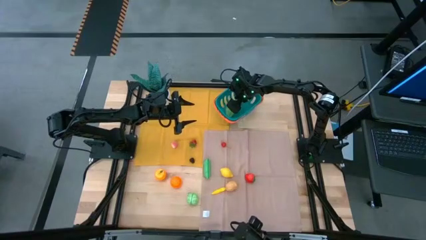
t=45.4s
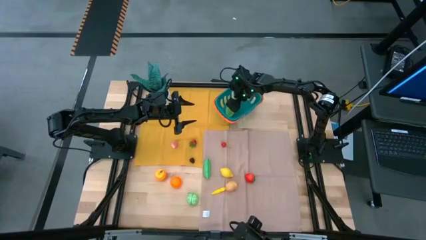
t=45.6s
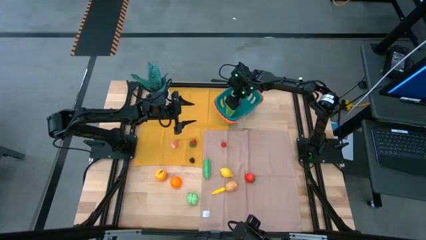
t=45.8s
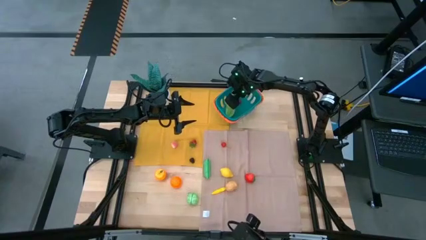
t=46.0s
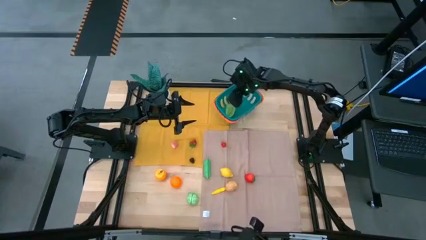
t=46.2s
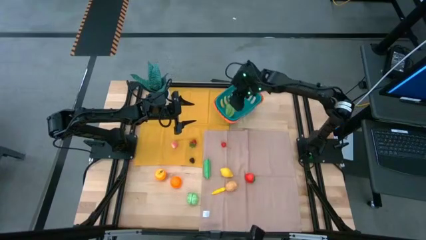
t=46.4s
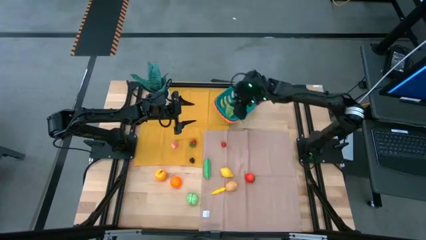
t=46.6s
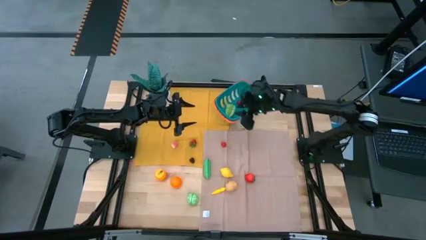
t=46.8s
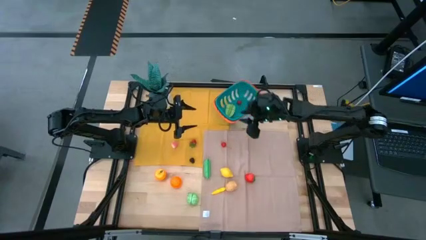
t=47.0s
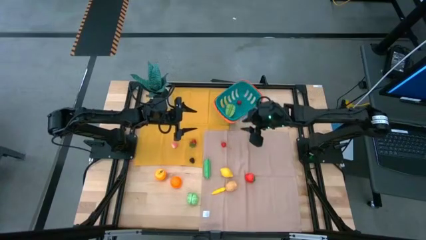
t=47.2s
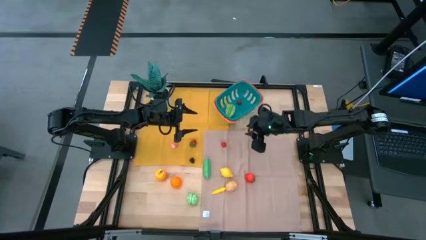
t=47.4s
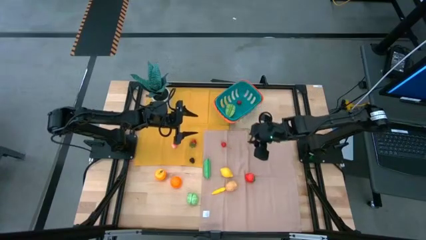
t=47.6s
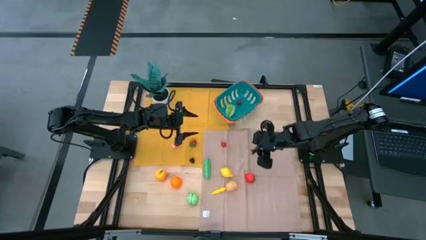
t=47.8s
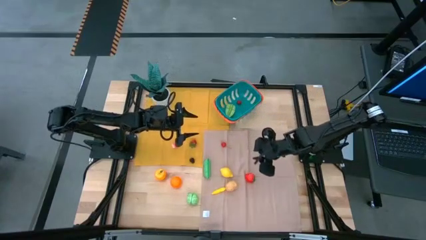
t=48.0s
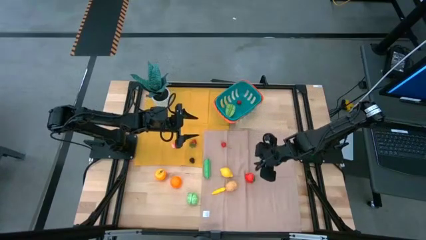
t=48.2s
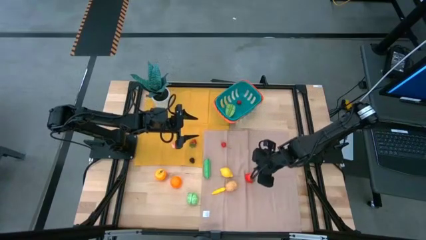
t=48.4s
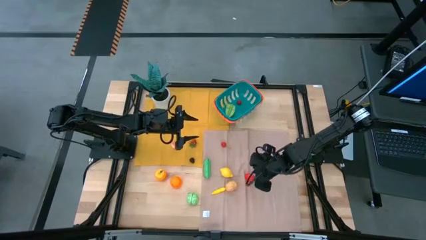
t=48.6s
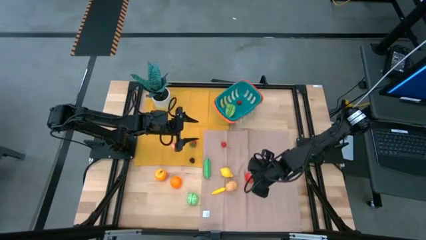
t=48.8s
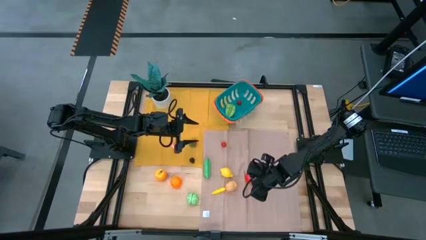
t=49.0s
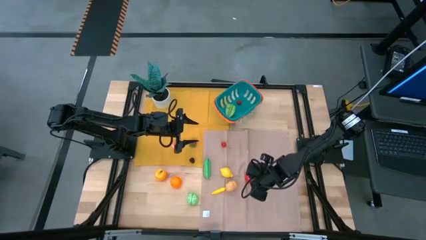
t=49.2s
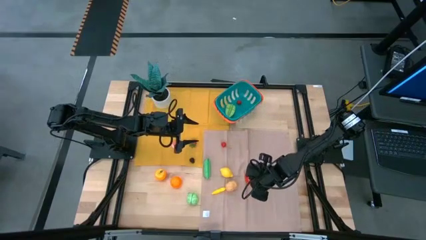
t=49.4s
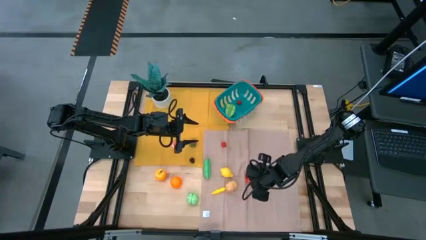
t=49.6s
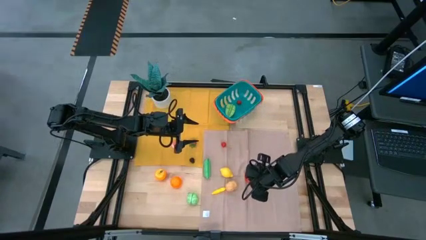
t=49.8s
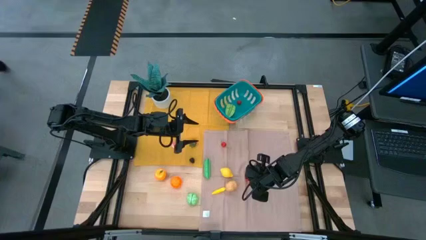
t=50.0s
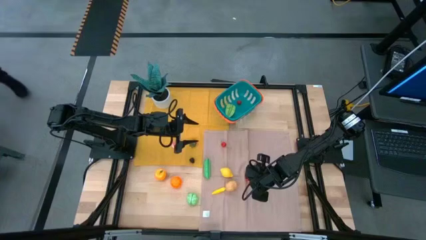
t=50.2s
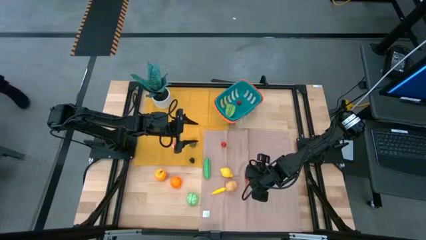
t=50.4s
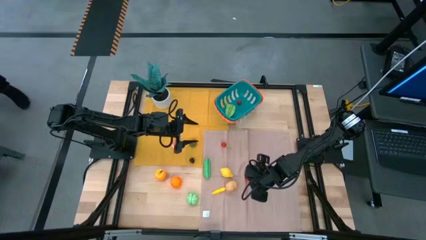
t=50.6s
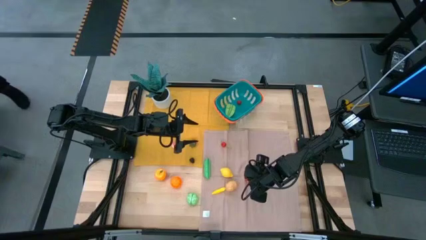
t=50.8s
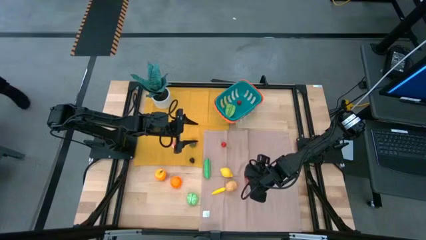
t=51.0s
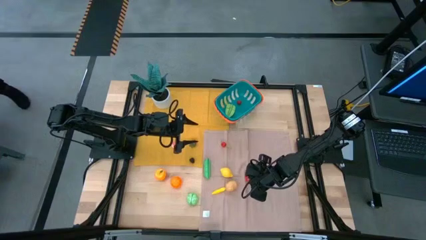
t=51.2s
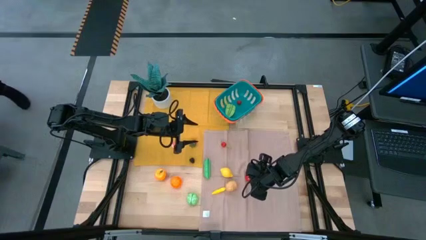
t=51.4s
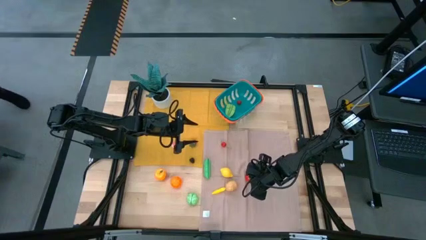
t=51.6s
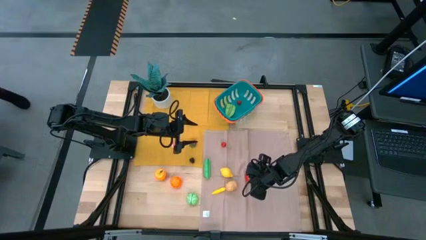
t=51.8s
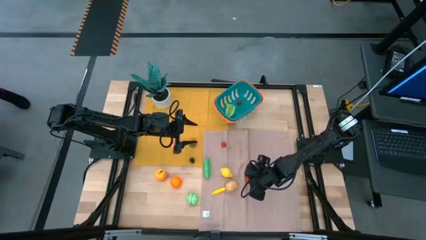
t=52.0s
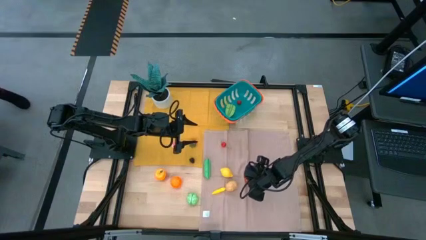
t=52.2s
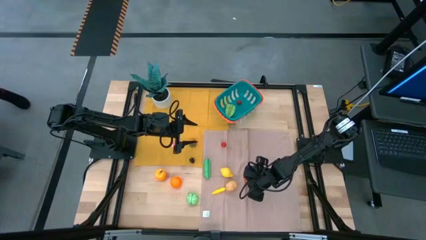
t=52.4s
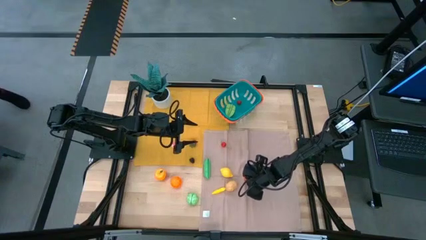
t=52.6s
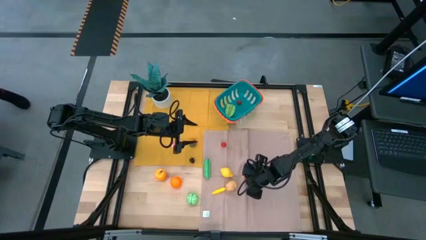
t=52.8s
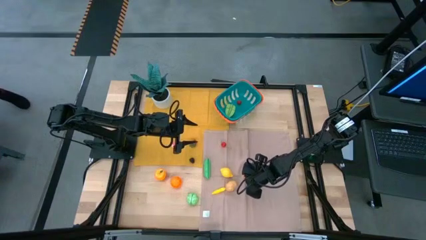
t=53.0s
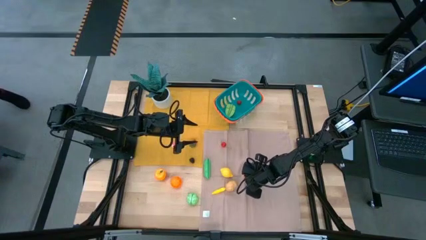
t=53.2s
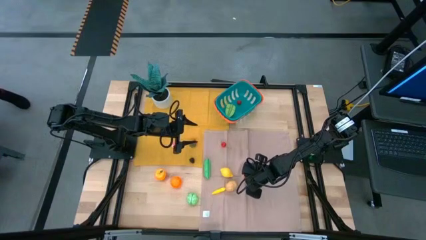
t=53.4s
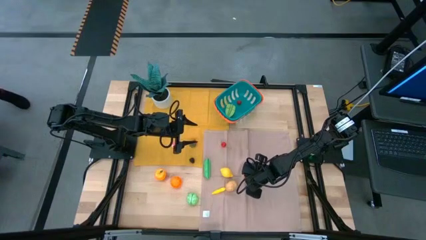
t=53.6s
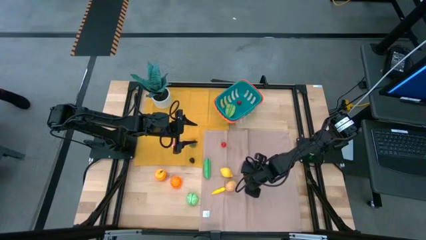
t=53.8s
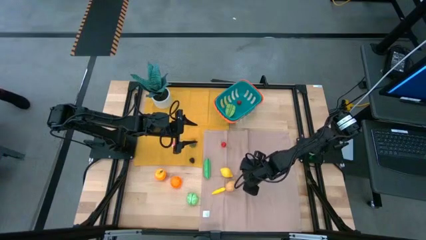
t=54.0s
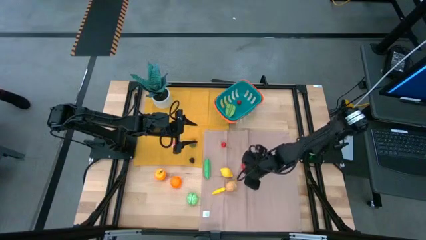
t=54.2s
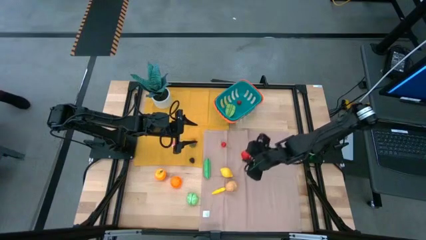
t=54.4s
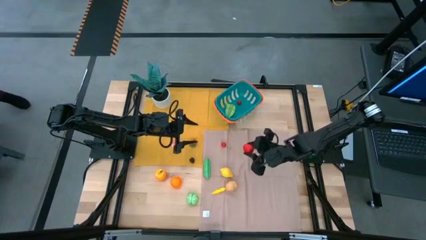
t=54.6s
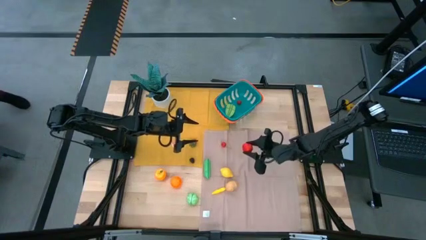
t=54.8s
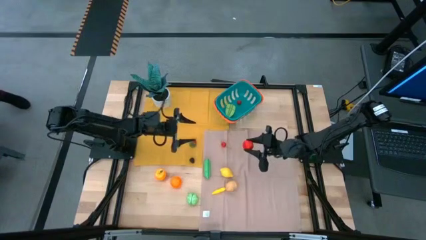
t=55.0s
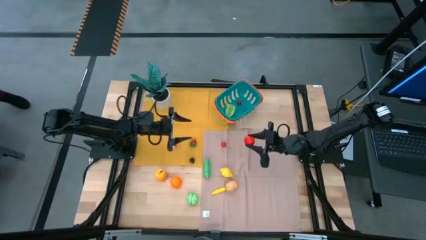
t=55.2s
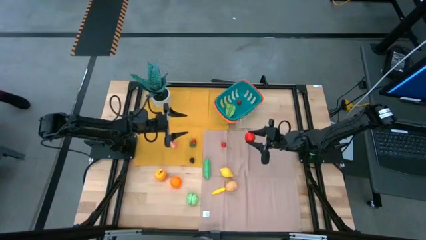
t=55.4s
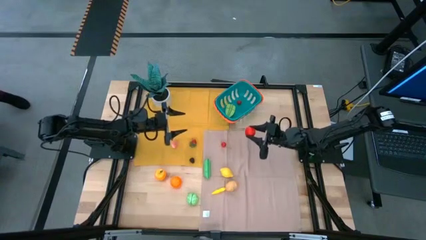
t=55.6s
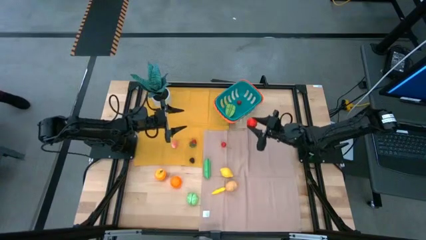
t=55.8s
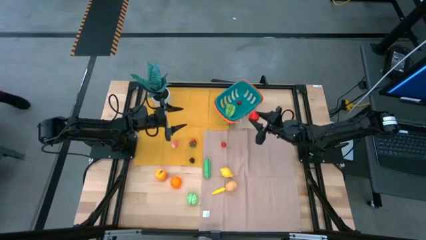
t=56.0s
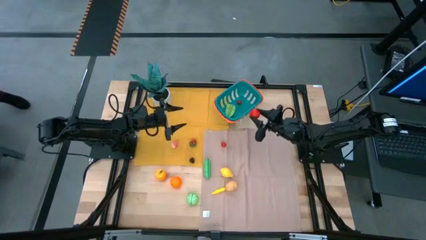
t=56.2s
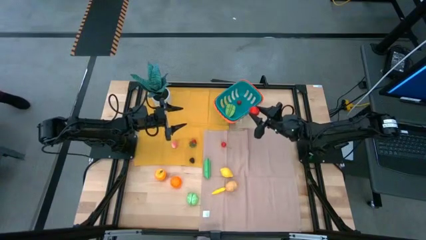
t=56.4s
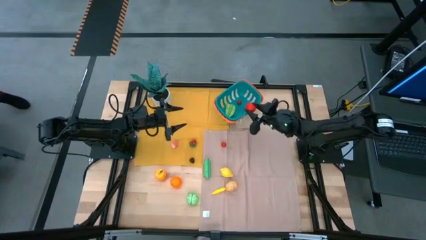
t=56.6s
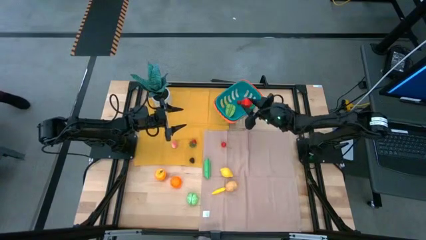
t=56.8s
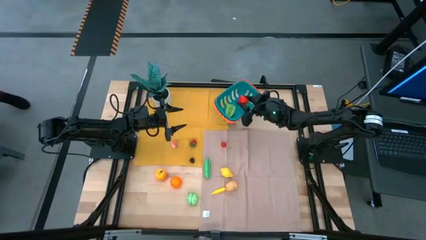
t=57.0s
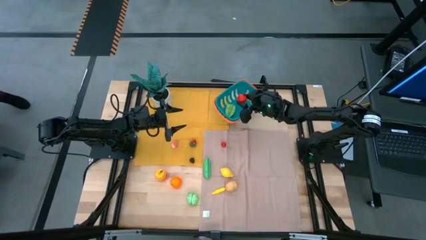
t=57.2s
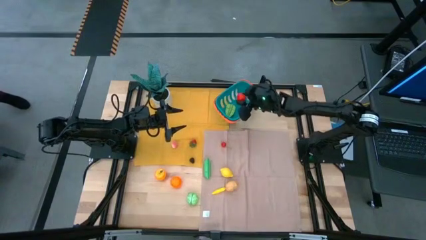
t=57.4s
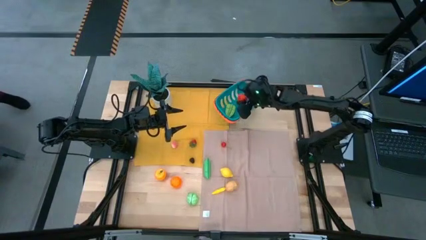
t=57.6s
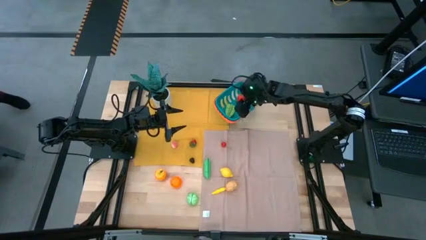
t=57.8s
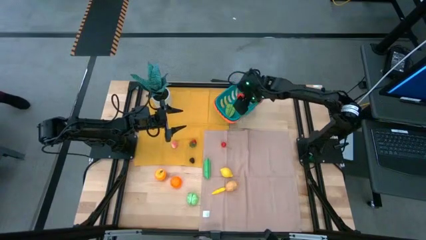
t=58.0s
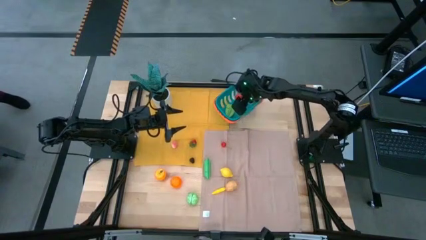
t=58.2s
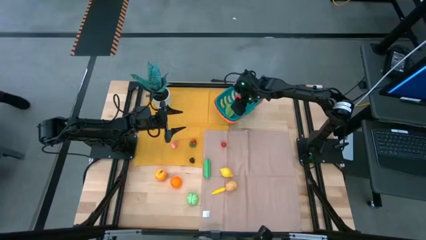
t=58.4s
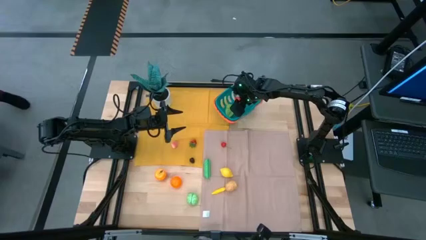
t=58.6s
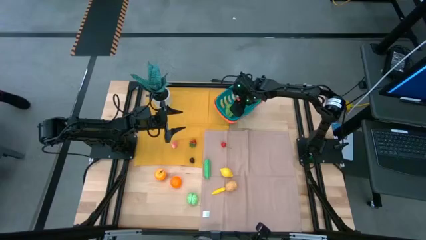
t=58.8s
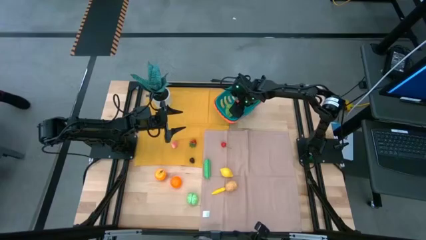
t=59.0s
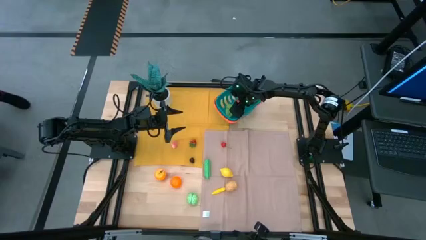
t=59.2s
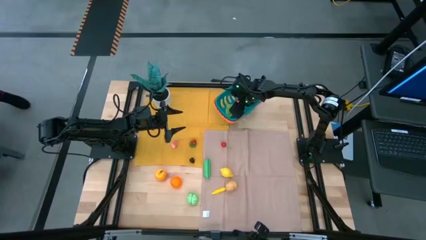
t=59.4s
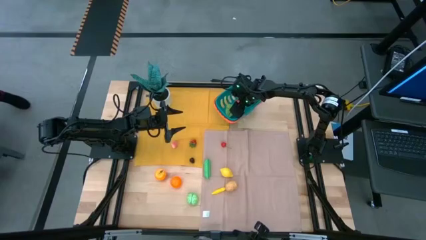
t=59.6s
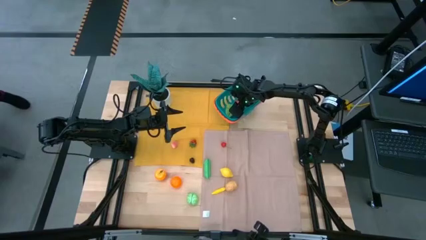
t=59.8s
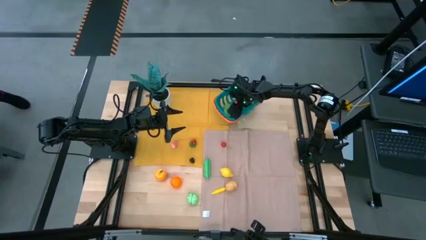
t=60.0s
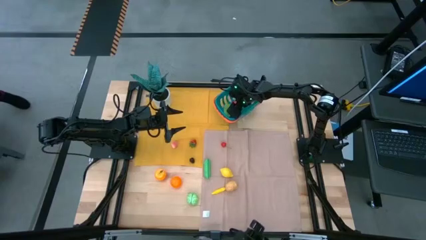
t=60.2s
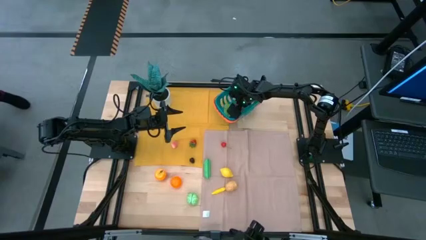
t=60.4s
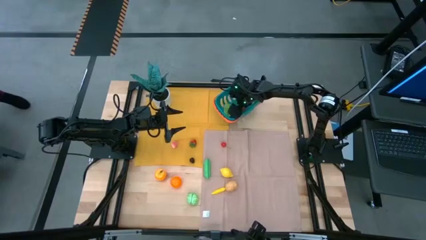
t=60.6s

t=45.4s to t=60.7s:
Task: Pick and placing Produce into tupperware
Put the right strawberry into the basket

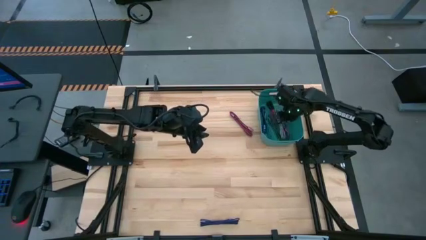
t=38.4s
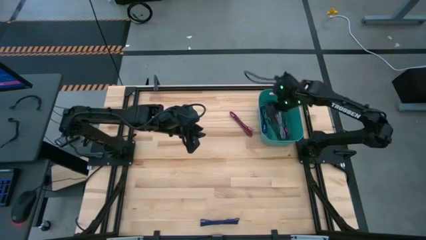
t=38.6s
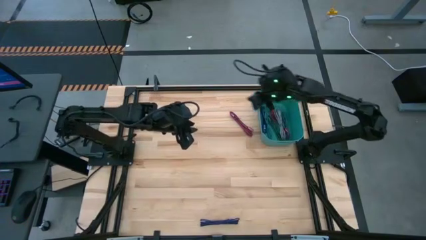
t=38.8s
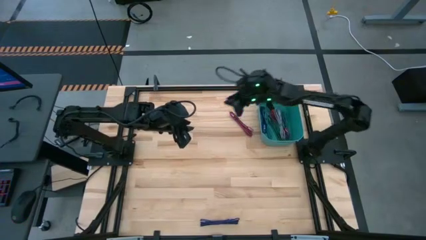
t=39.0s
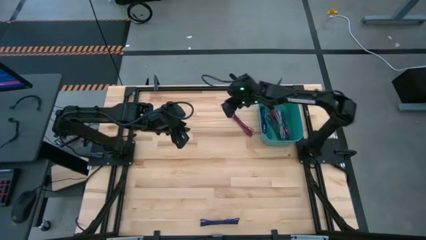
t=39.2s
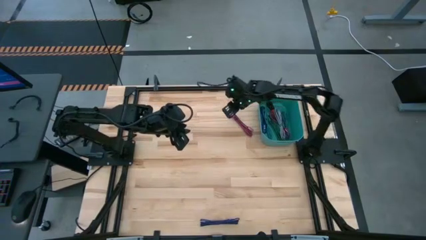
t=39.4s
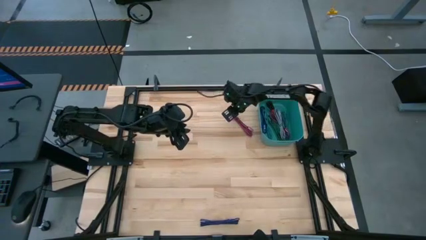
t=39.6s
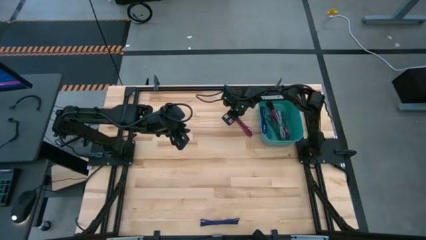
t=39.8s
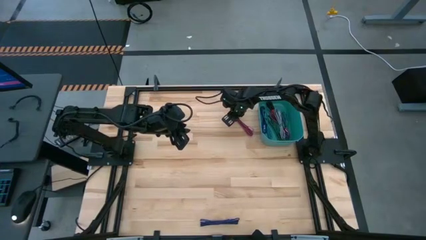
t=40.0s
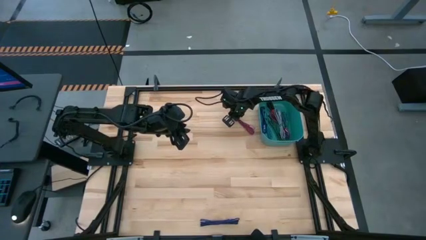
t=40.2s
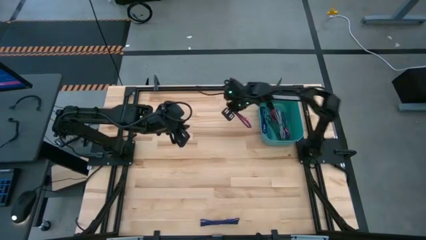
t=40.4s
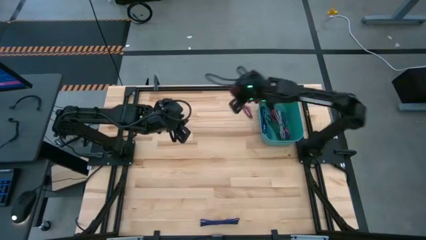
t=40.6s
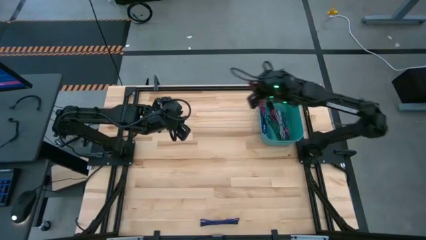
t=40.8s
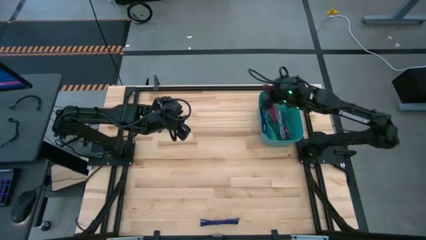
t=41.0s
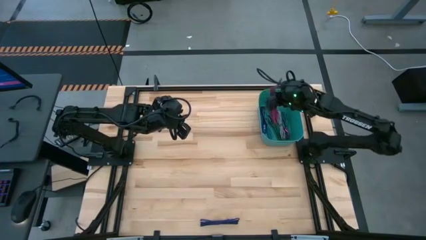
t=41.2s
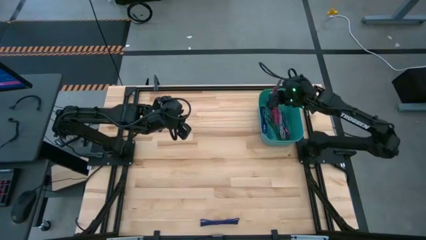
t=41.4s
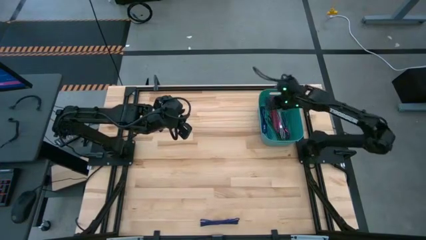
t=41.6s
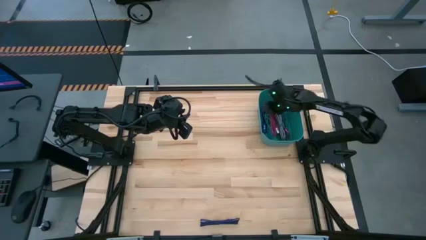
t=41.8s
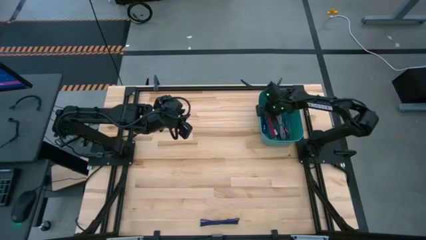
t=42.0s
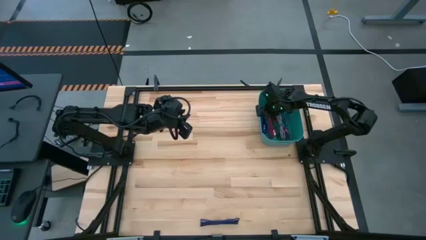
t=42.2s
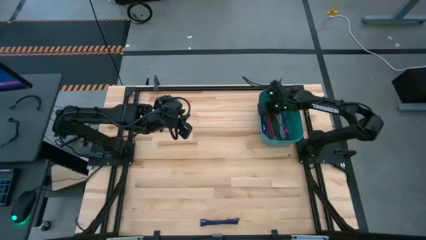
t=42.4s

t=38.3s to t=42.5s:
Task: Pick and place USB-C Cables
Put the pink charger cable into the green bin
